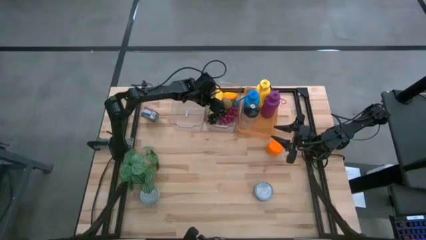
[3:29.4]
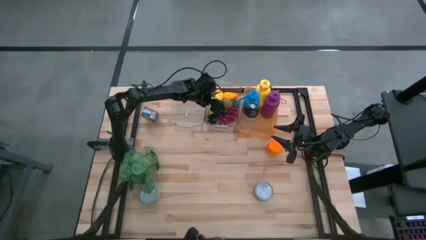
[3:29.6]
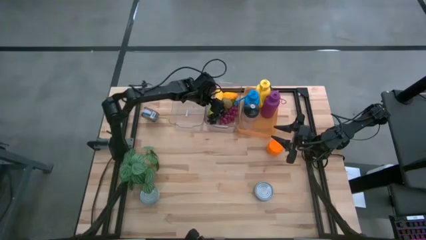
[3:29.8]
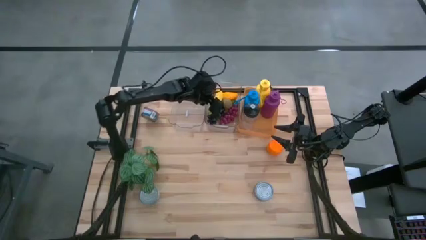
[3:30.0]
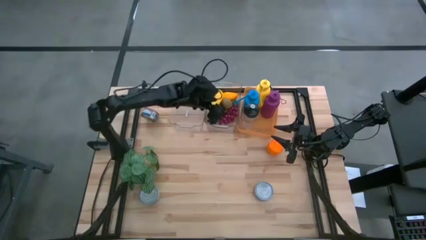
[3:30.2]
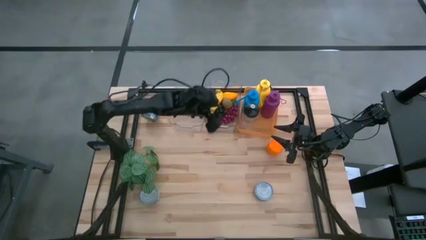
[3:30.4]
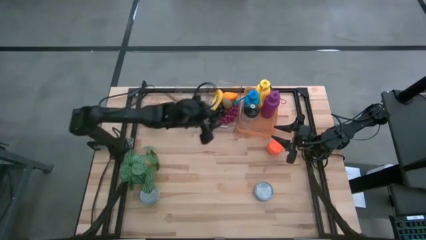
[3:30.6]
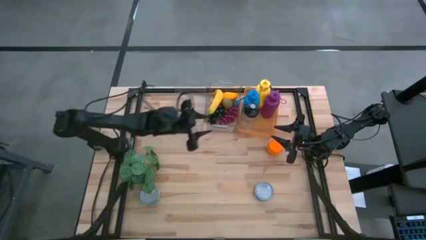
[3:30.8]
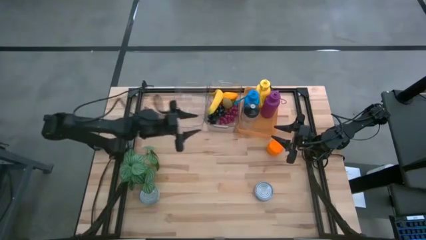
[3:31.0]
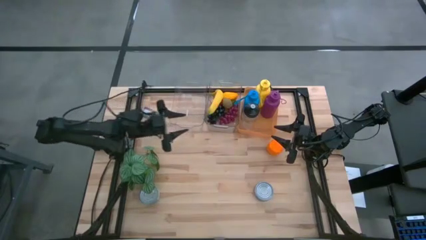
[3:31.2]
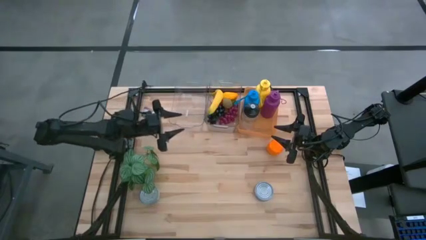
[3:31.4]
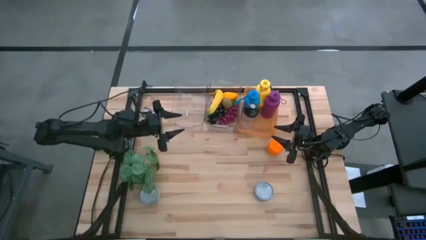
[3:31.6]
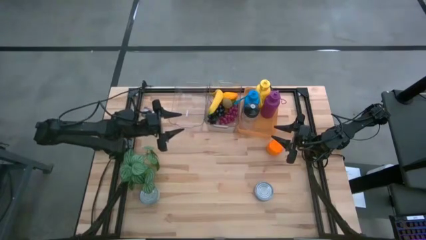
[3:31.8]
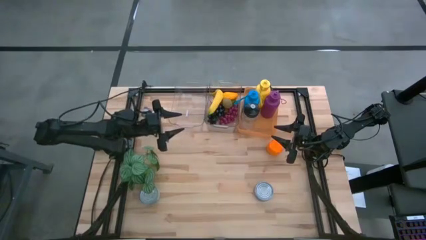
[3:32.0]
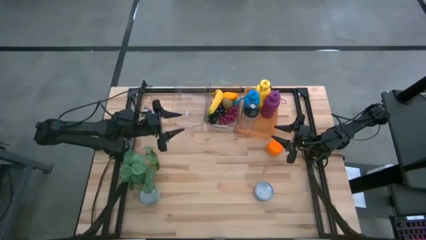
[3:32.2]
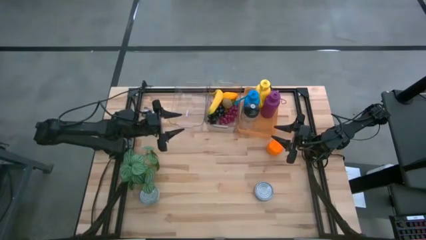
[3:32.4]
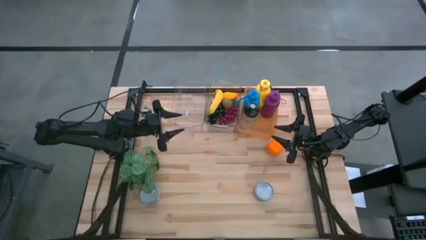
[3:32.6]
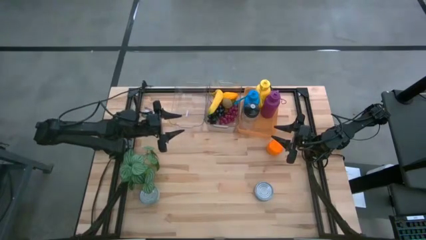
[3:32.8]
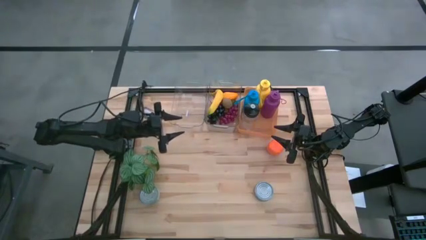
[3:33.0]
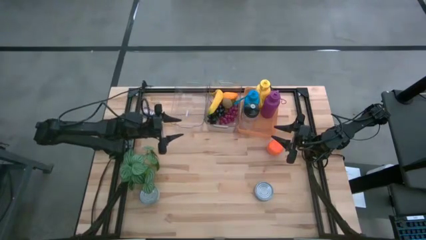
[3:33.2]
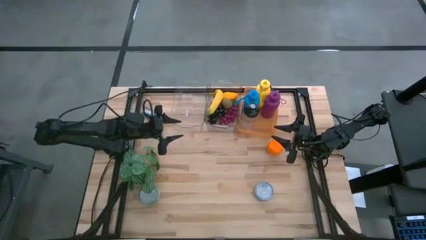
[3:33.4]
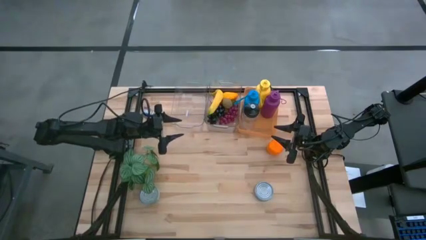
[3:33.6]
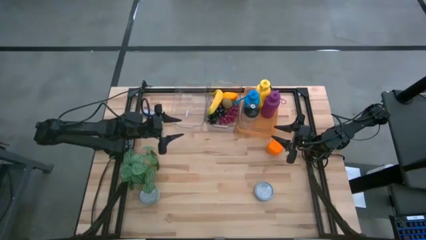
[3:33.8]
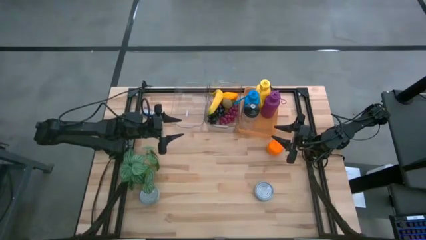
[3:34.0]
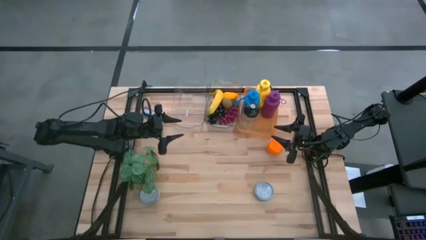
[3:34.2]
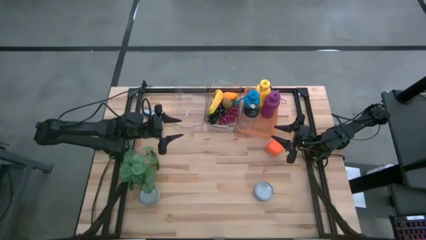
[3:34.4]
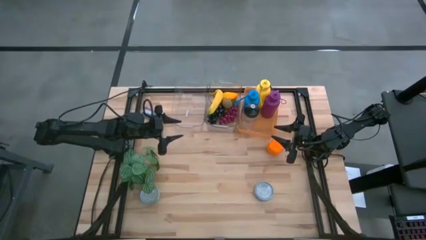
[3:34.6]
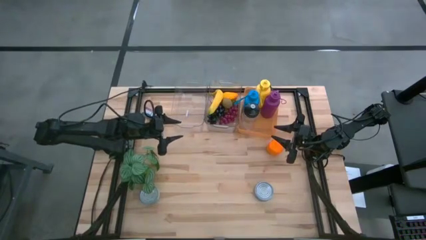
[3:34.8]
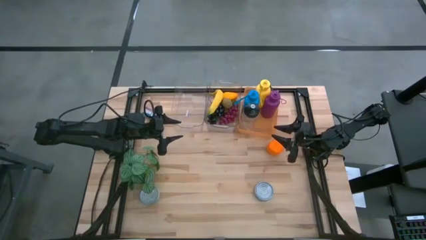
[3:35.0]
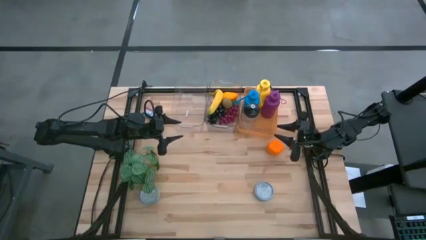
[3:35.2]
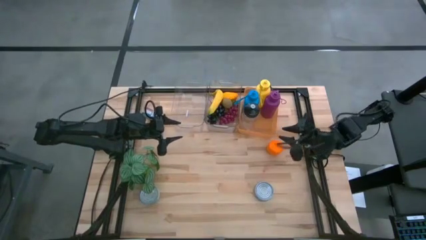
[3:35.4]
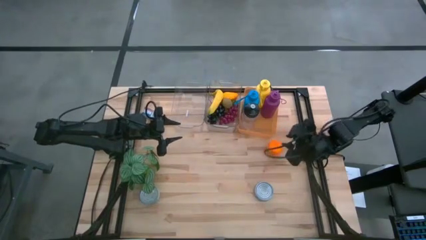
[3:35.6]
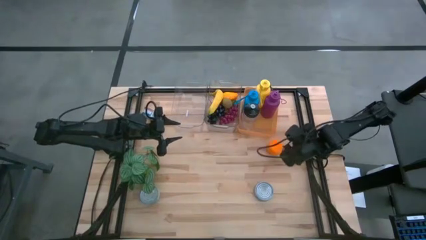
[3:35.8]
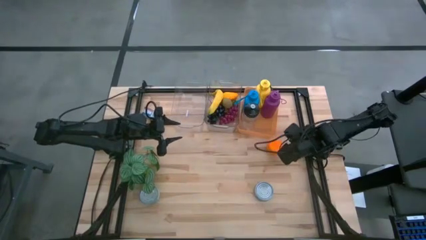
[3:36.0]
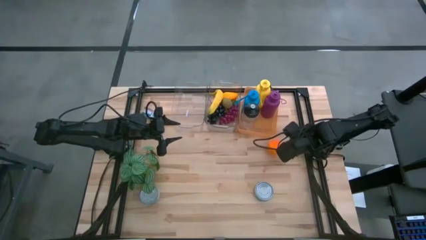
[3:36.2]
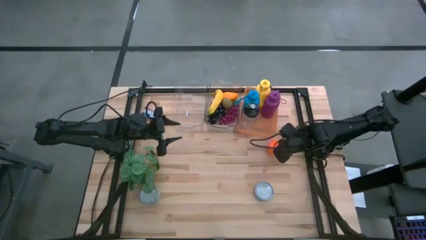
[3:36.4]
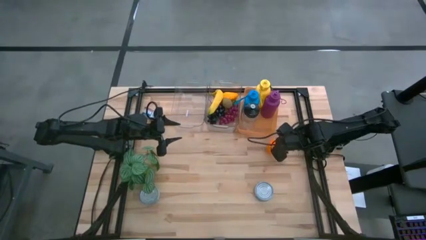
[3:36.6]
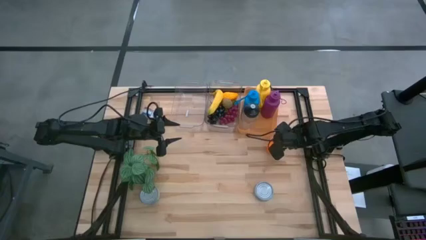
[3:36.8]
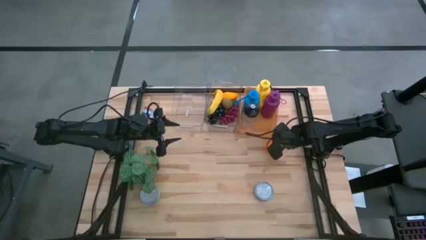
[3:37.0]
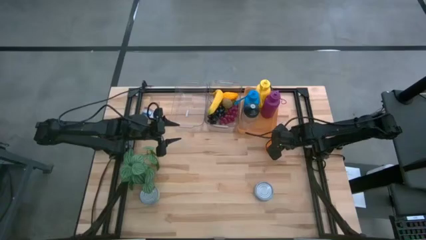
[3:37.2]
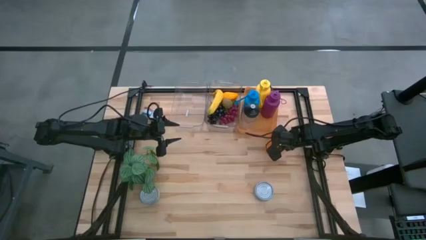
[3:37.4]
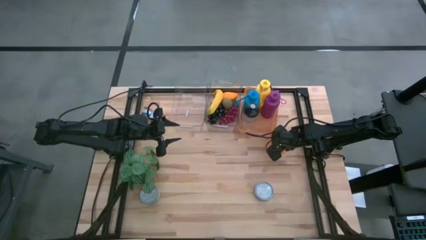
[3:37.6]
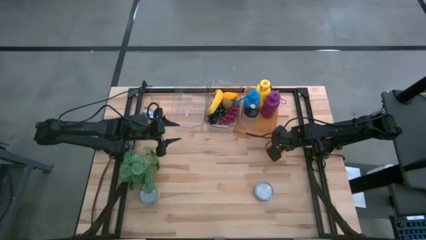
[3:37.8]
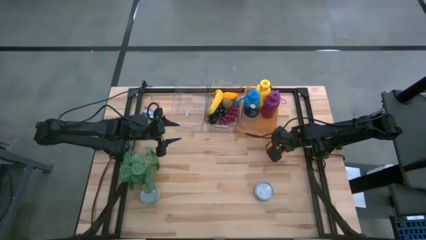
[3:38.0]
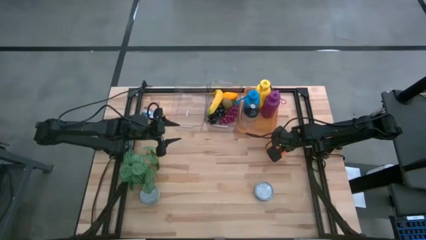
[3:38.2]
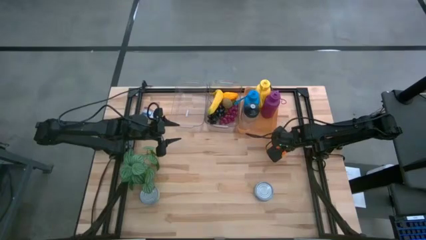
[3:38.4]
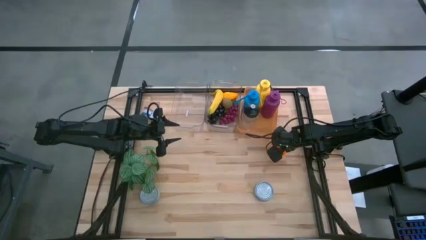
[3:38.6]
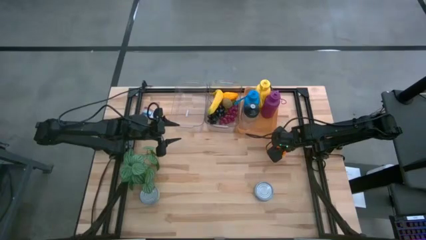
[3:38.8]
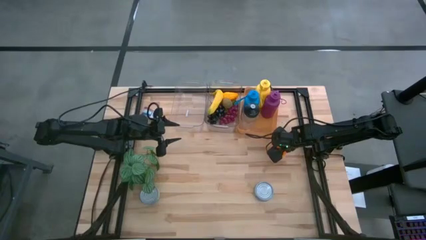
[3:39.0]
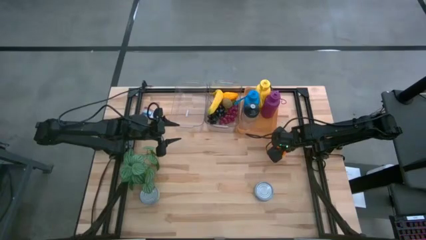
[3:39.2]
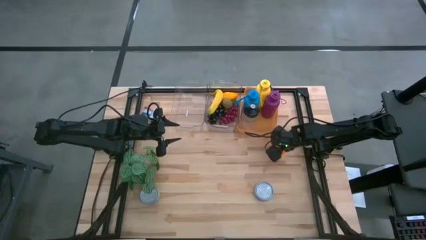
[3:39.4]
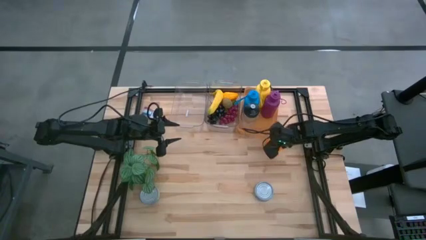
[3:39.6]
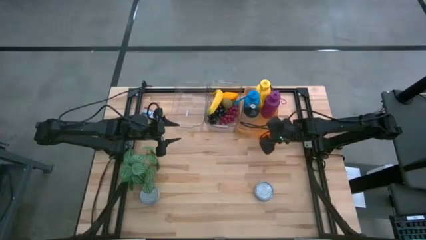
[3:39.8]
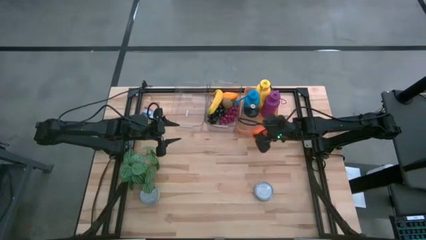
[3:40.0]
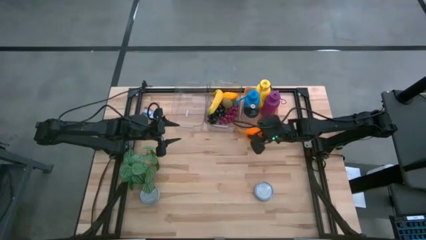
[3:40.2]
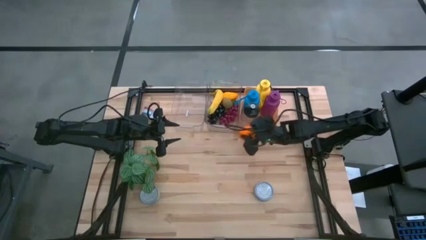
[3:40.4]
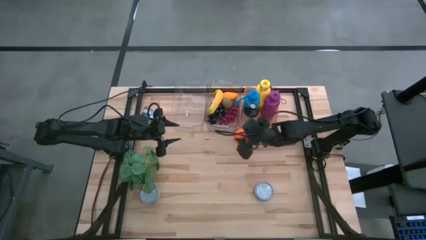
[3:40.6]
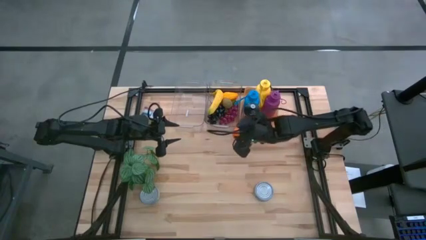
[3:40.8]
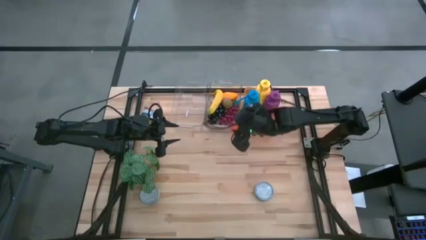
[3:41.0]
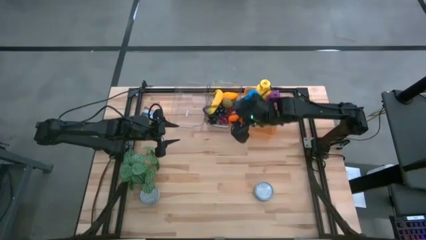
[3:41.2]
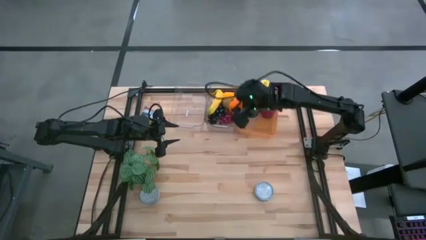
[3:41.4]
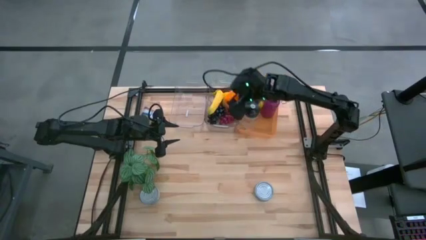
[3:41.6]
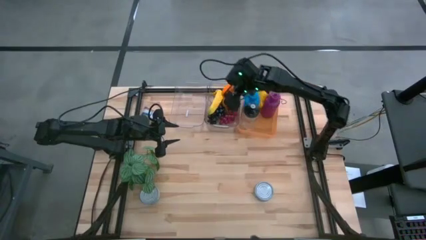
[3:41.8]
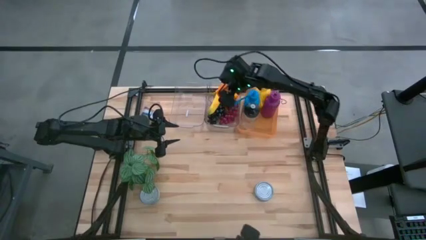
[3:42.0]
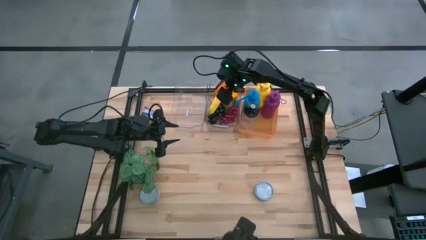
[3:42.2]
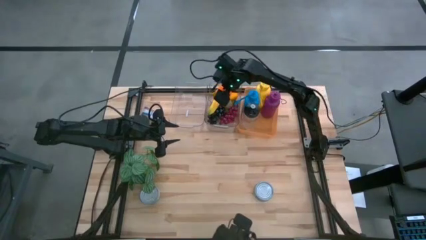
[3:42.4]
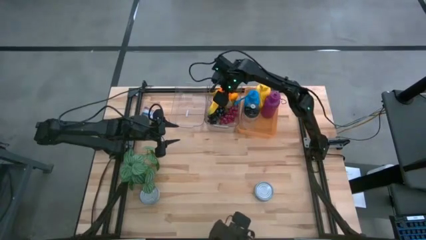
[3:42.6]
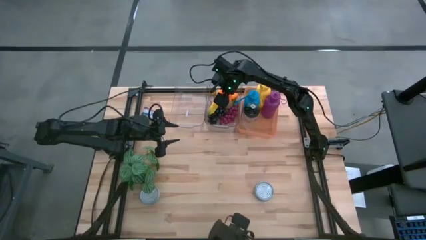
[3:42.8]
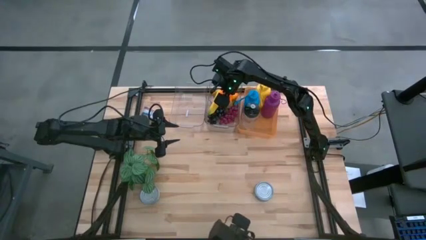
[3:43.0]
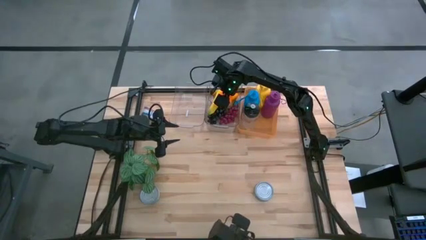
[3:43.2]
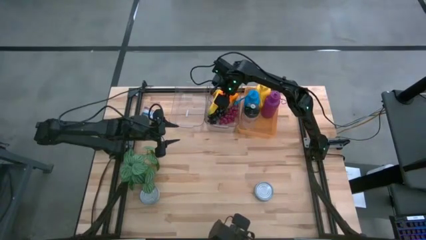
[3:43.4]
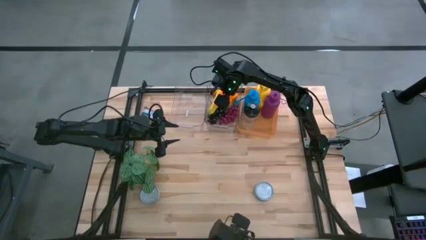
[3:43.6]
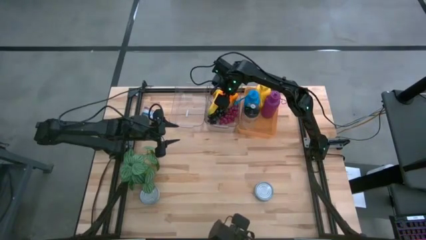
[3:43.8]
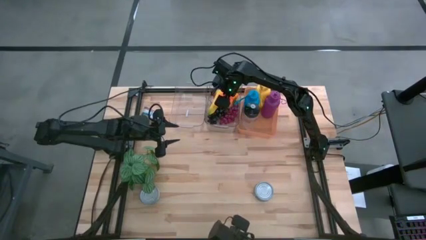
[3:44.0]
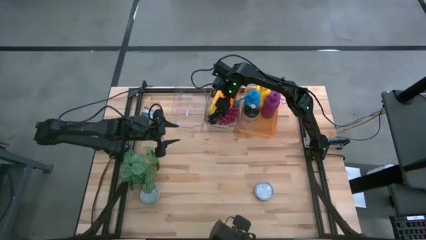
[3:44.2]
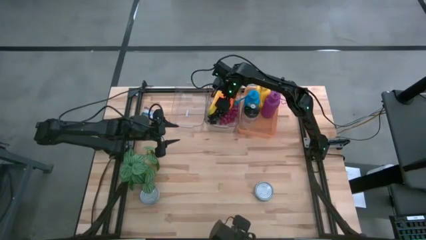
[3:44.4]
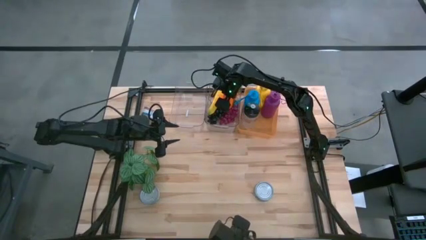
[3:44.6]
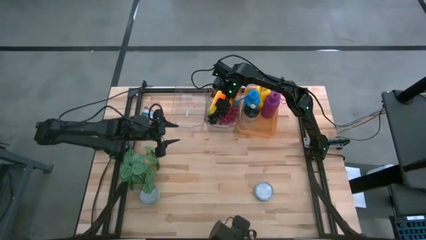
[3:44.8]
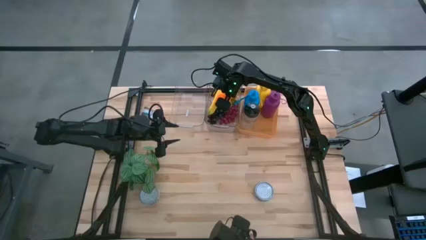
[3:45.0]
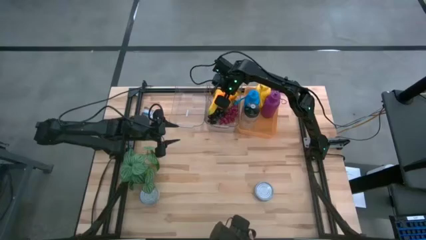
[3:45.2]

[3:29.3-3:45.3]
Task: Pick & Place Food Item
Put the orange into the right transparent bin
